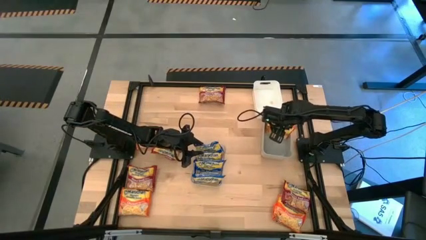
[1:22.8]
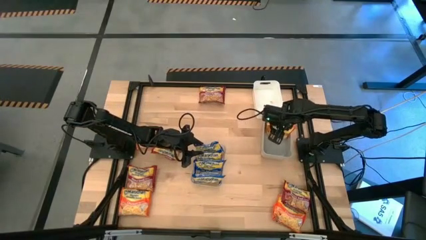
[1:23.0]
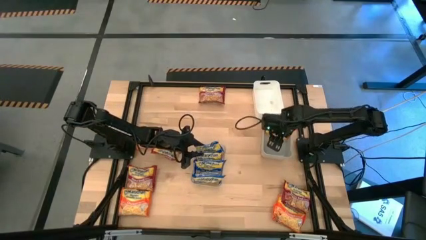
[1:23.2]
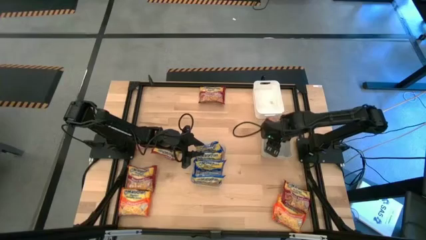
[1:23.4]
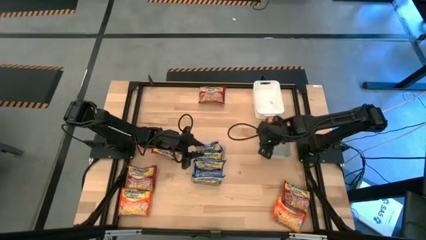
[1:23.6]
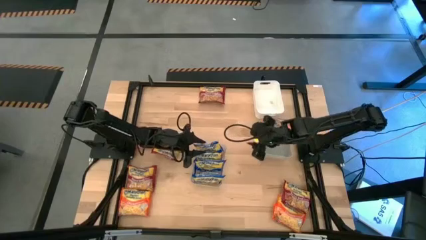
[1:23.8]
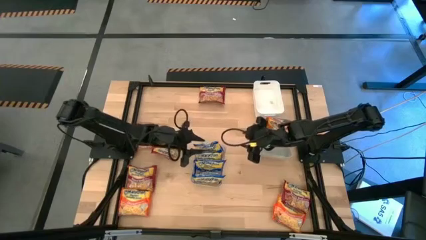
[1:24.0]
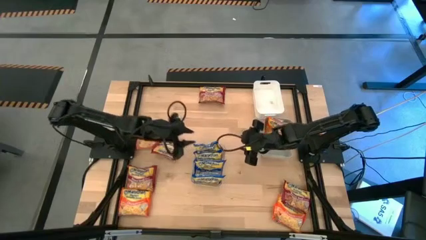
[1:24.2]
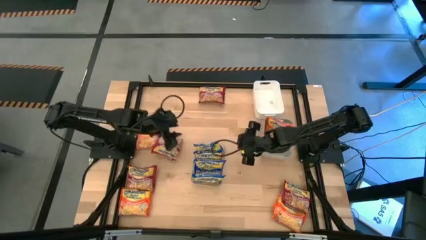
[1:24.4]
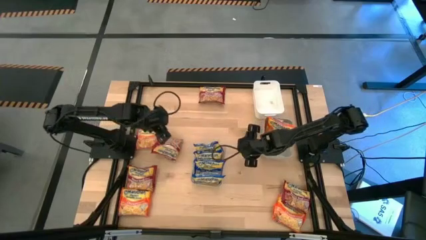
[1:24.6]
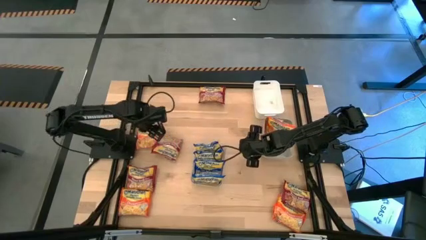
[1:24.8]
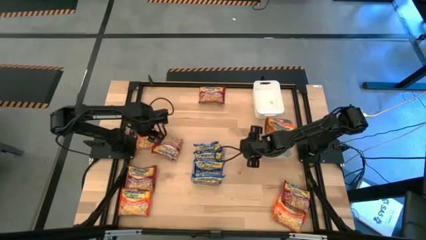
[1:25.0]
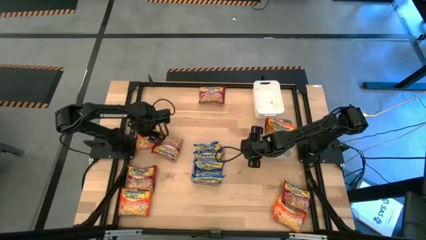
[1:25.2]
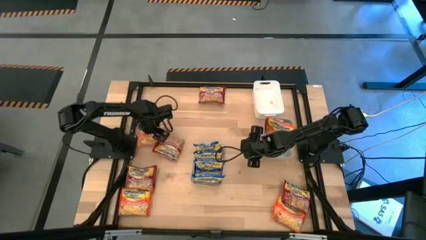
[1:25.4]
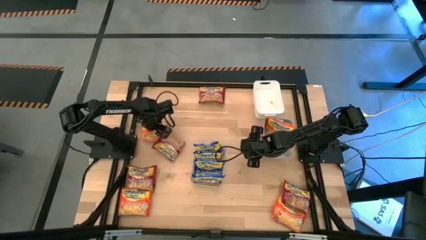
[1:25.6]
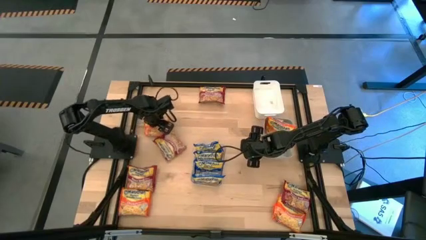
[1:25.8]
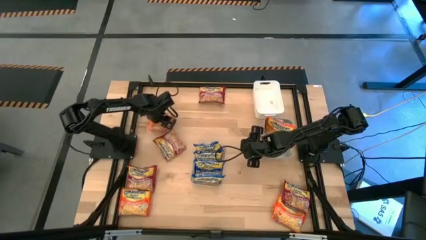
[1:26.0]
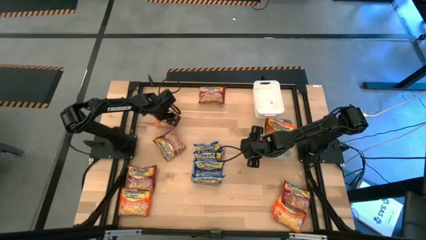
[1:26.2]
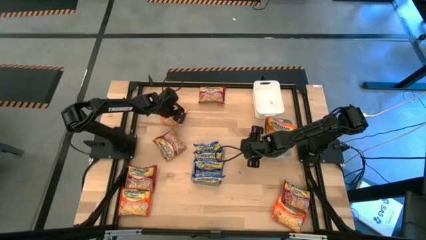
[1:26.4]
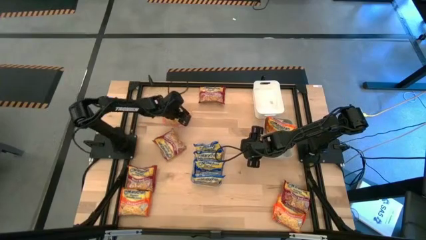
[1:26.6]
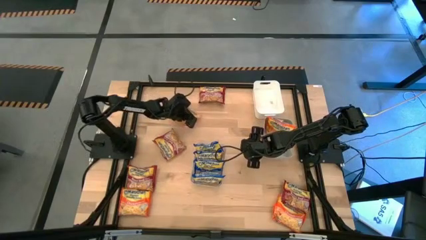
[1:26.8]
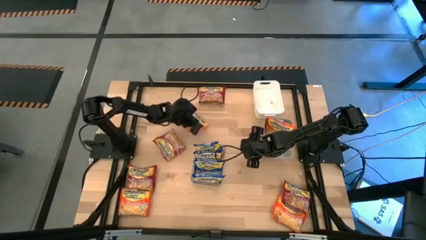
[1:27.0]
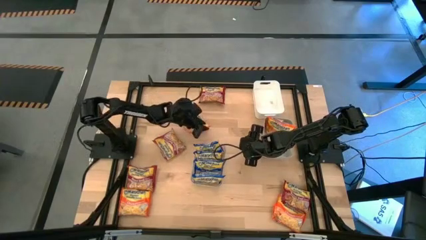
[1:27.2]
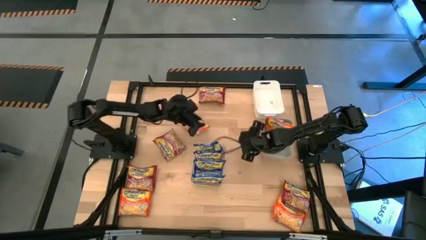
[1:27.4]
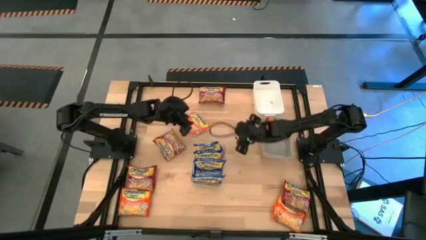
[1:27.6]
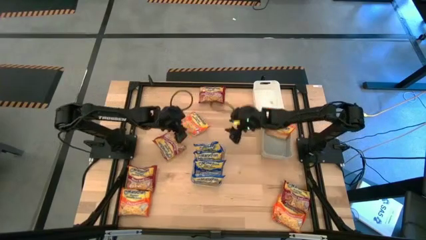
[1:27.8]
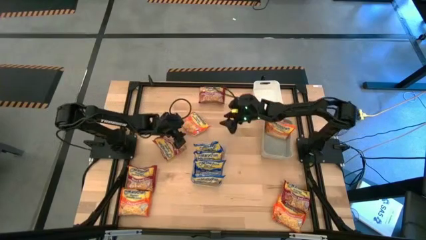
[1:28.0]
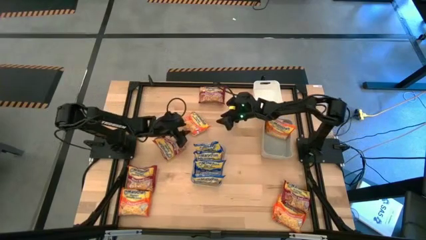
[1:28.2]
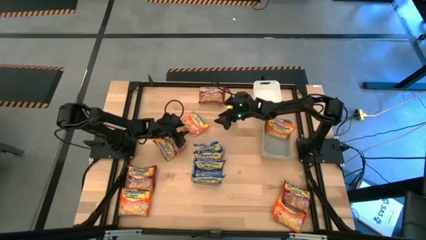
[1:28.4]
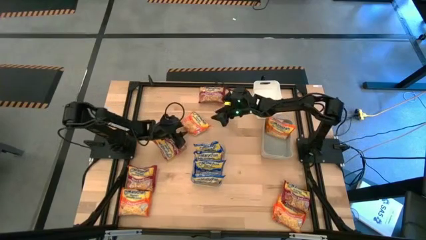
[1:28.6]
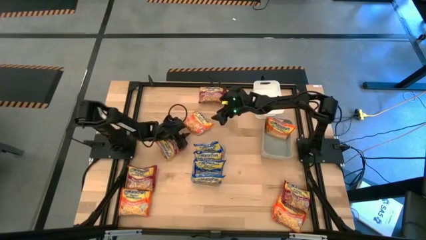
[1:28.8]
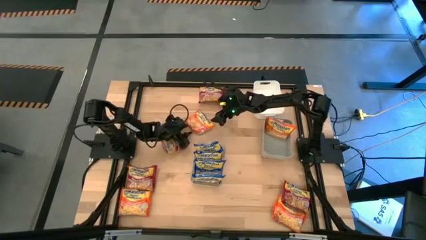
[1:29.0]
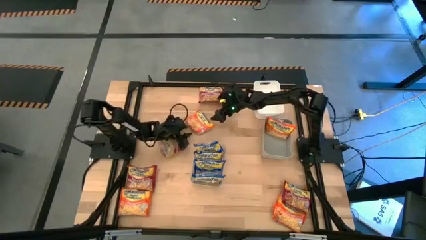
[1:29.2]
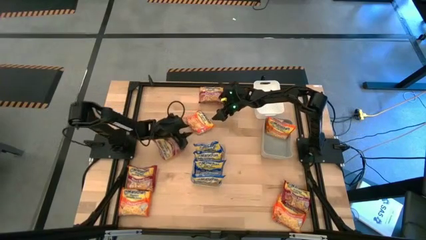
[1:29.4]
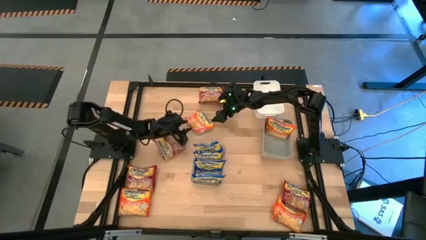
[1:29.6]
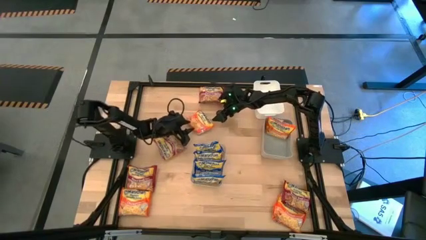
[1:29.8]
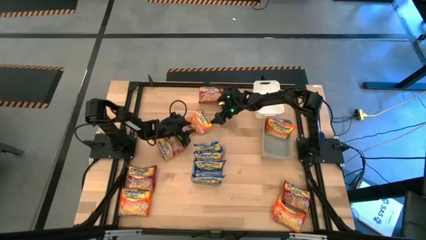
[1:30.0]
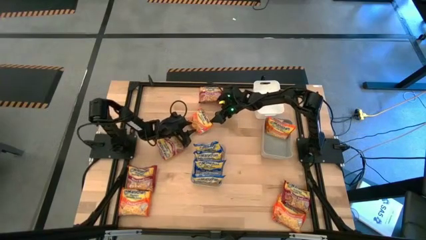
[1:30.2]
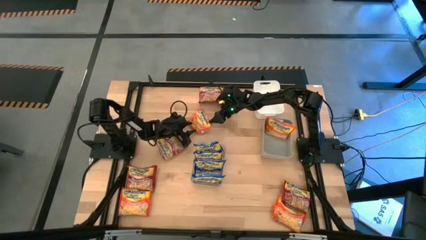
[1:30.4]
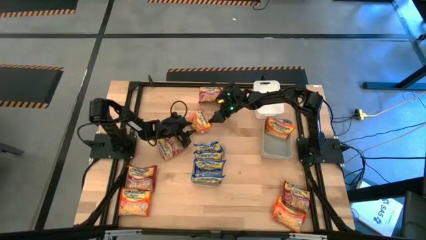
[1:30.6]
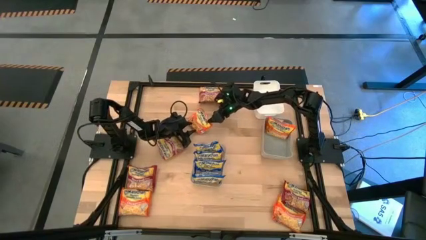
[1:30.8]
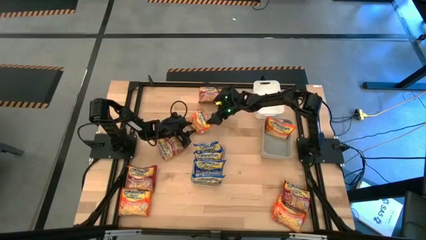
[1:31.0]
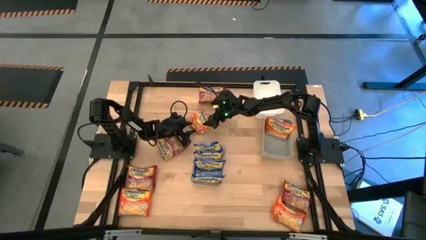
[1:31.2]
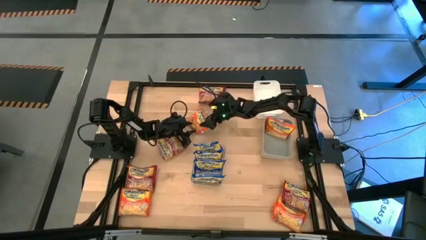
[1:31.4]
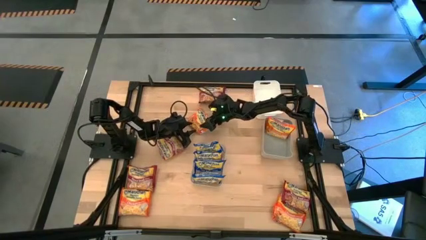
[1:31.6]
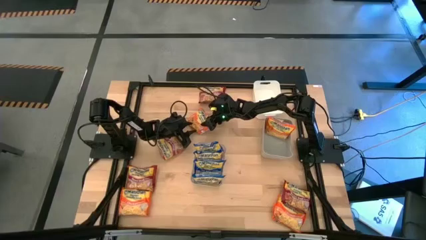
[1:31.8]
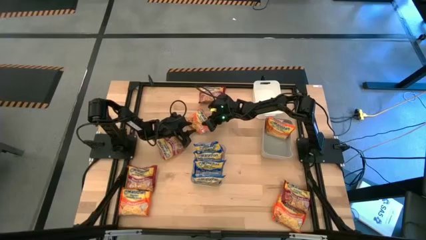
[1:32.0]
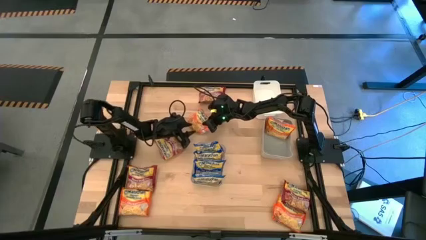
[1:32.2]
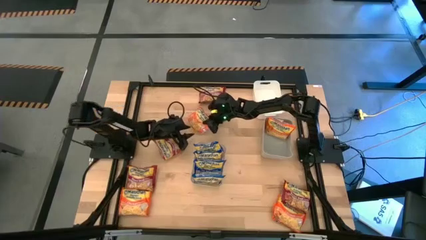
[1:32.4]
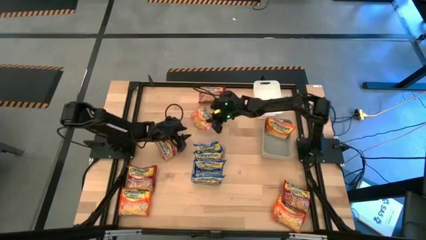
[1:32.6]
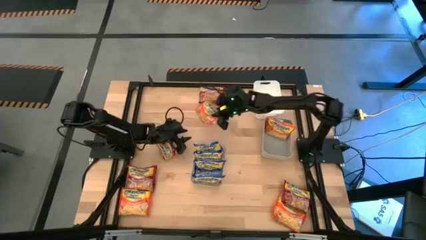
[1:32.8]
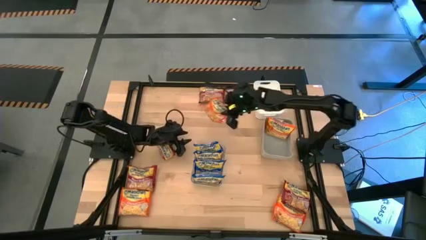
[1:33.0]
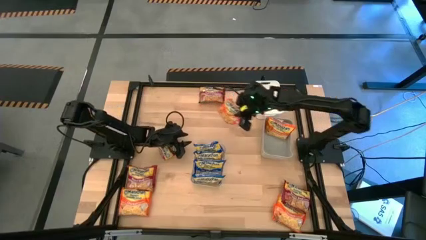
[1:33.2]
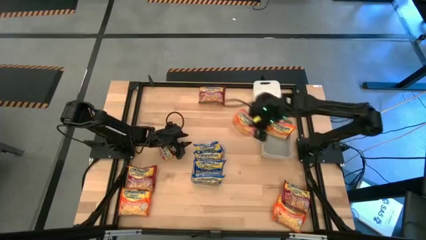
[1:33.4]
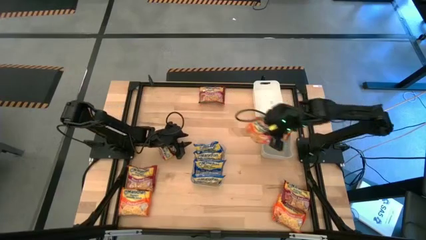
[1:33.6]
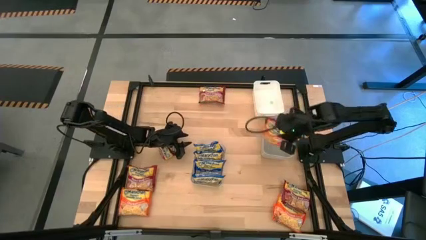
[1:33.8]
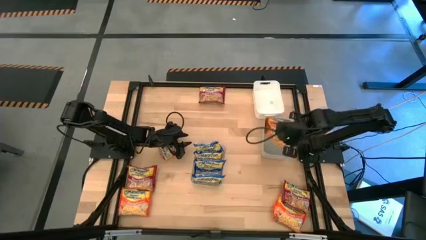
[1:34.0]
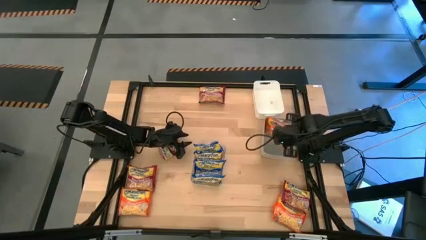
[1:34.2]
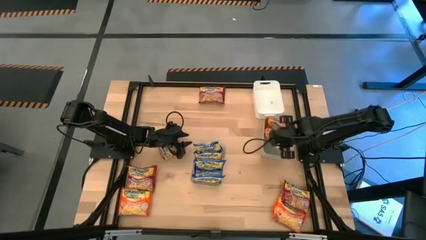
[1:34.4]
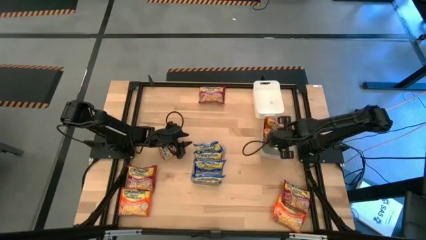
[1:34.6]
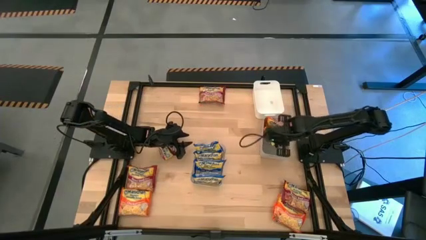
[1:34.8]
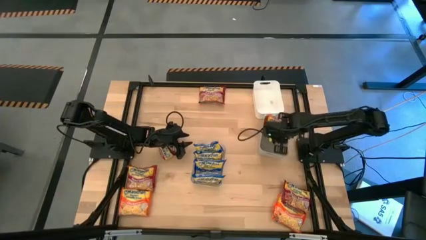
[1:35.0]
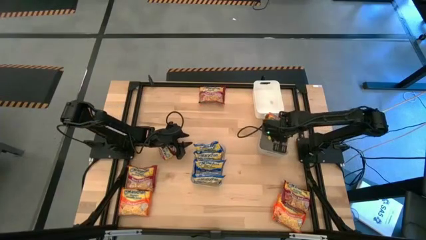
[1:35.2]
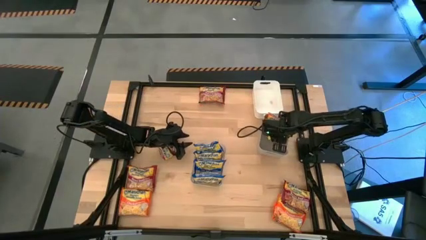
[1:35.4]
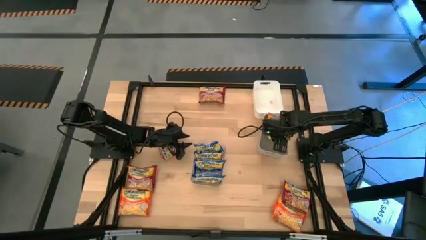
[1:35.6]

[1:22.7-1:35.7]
Task: Sort Maruchan noodles
Put the top left orange noodle pack into the gray bin
